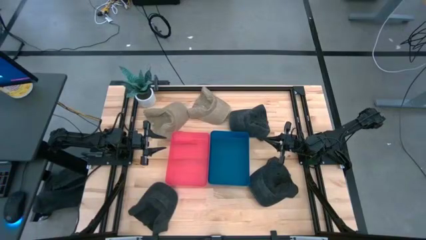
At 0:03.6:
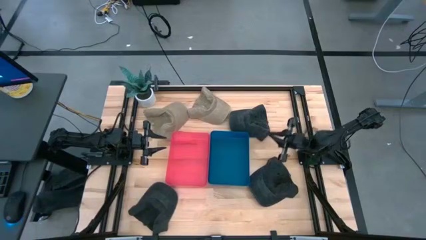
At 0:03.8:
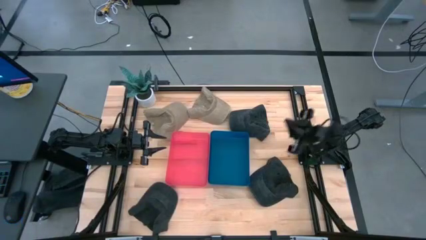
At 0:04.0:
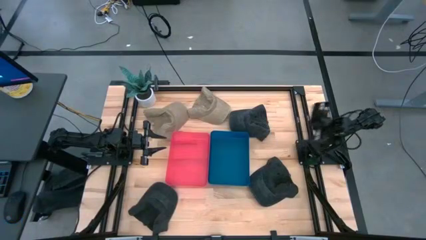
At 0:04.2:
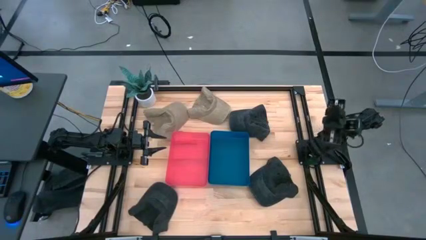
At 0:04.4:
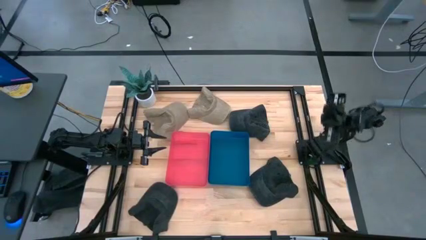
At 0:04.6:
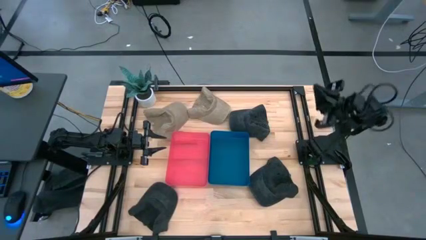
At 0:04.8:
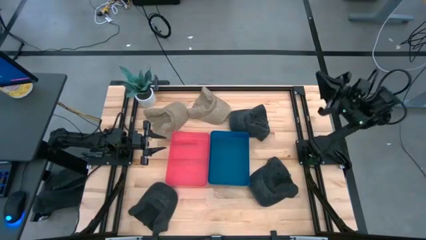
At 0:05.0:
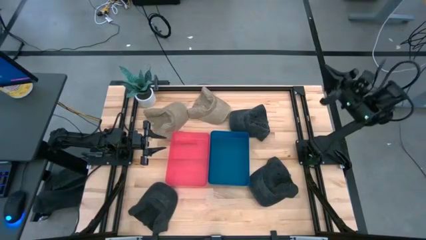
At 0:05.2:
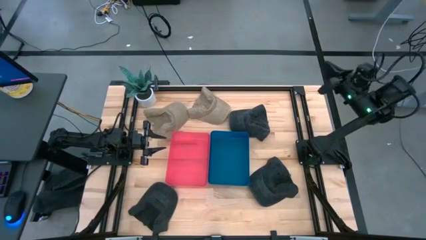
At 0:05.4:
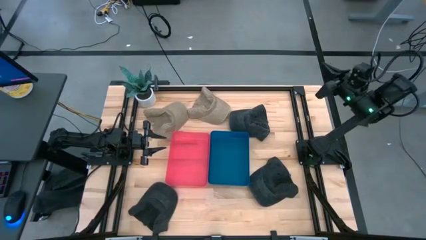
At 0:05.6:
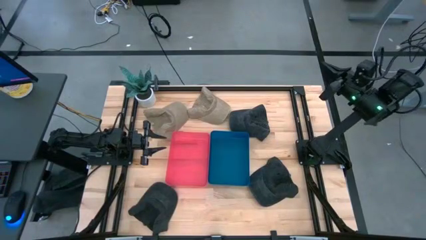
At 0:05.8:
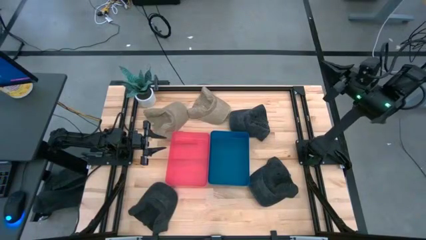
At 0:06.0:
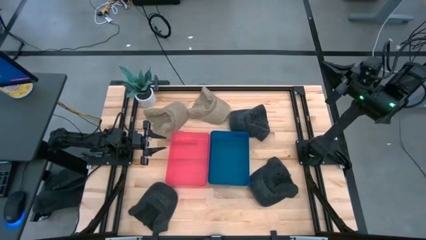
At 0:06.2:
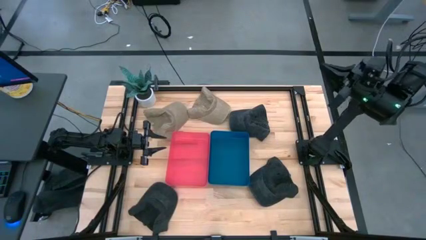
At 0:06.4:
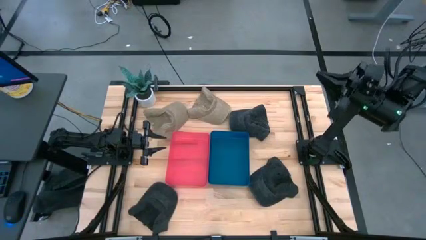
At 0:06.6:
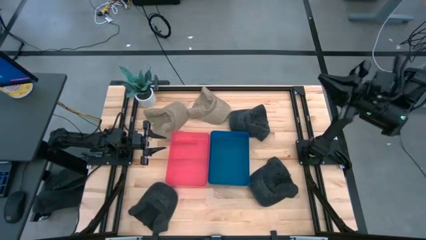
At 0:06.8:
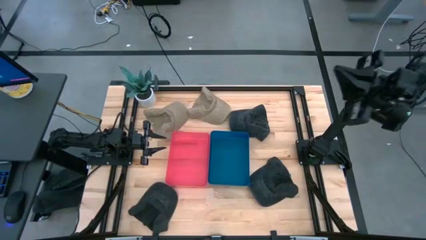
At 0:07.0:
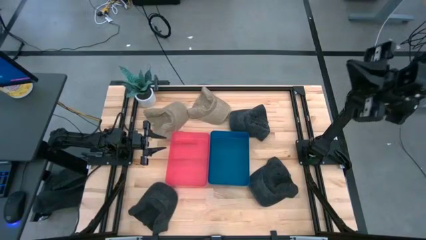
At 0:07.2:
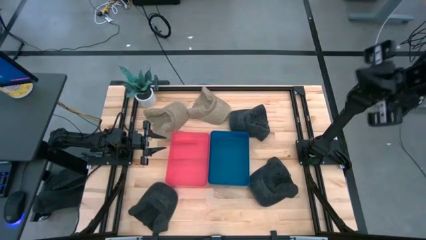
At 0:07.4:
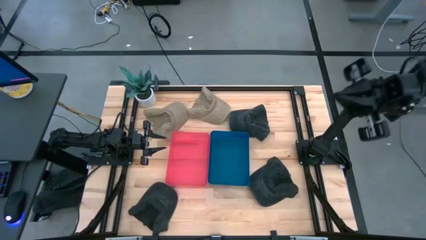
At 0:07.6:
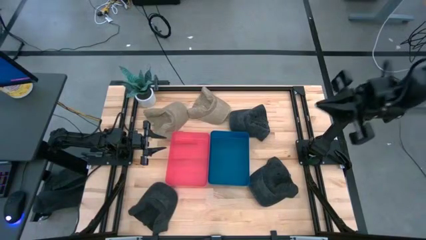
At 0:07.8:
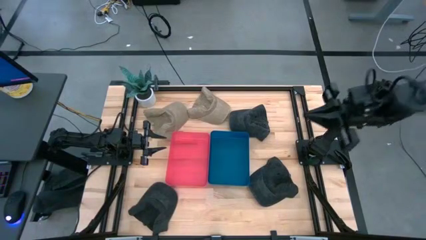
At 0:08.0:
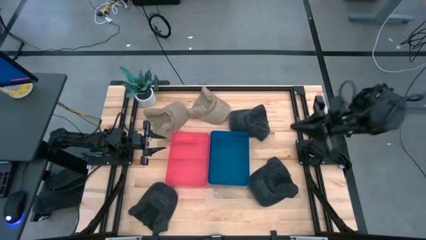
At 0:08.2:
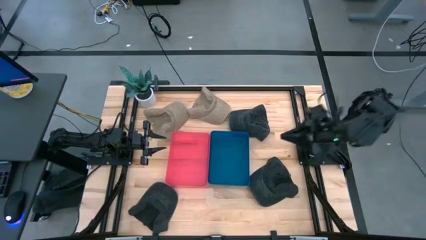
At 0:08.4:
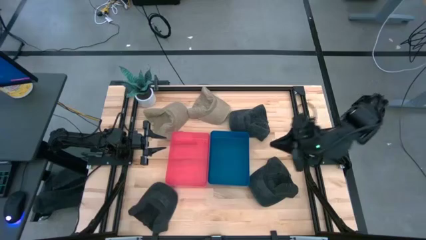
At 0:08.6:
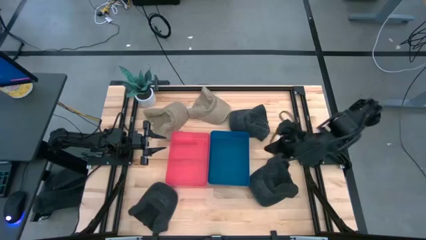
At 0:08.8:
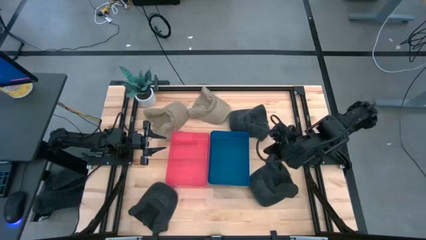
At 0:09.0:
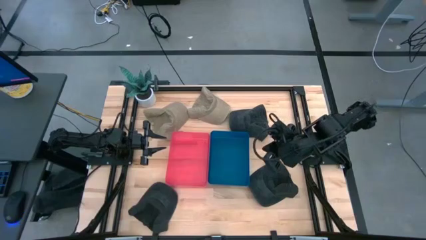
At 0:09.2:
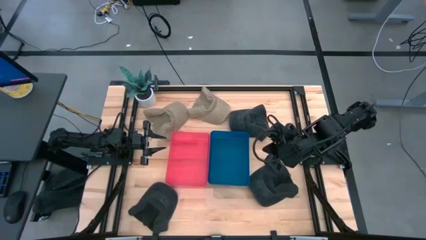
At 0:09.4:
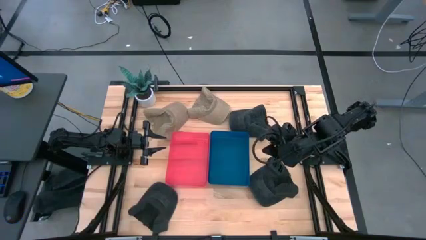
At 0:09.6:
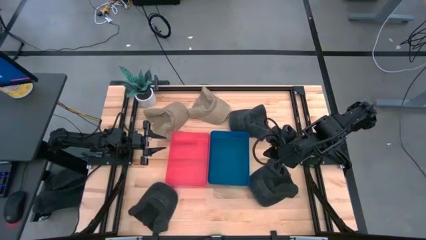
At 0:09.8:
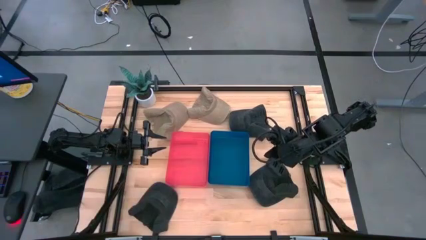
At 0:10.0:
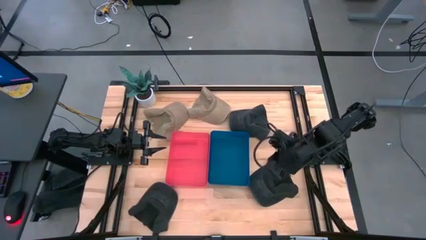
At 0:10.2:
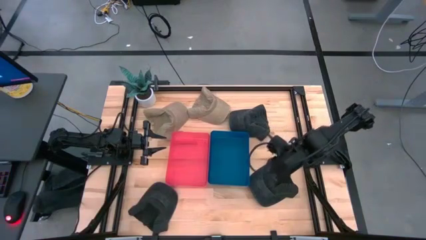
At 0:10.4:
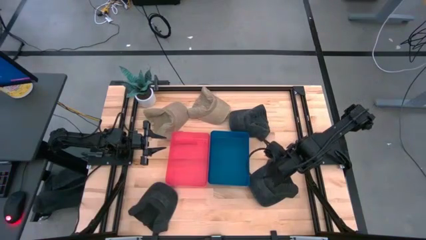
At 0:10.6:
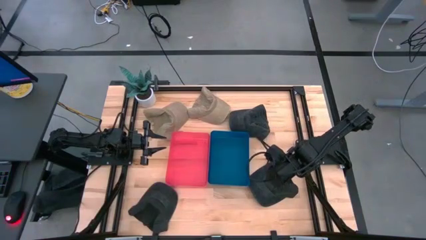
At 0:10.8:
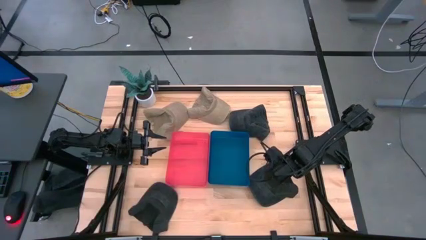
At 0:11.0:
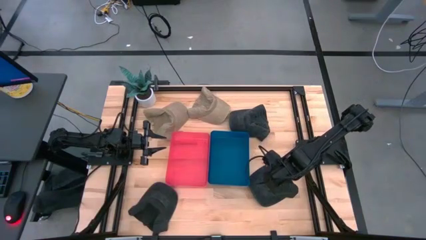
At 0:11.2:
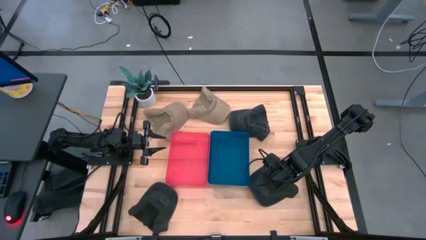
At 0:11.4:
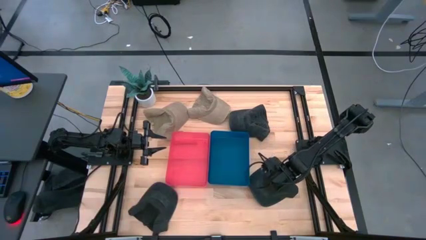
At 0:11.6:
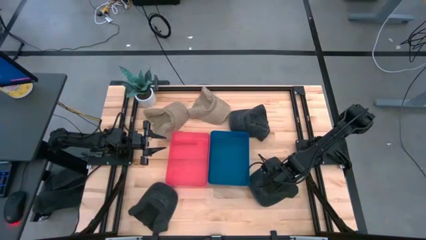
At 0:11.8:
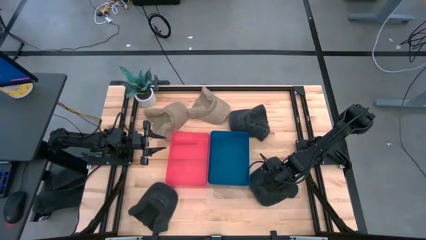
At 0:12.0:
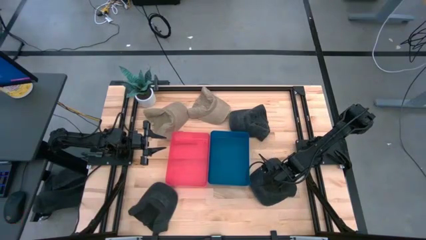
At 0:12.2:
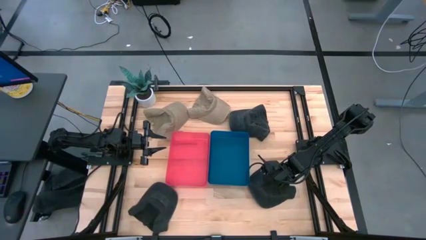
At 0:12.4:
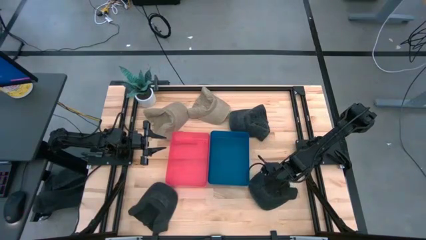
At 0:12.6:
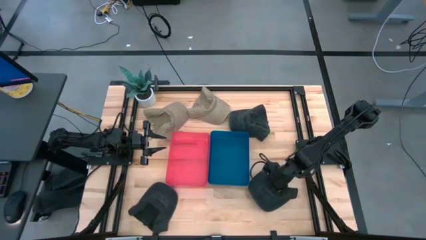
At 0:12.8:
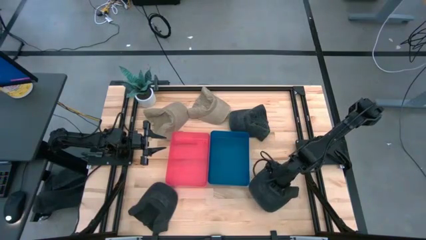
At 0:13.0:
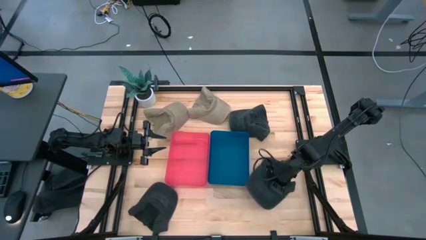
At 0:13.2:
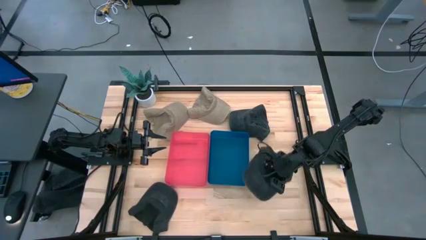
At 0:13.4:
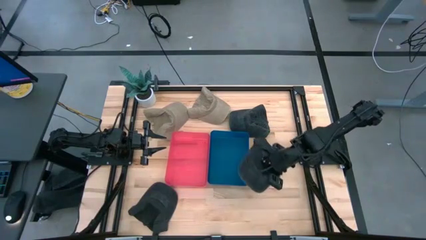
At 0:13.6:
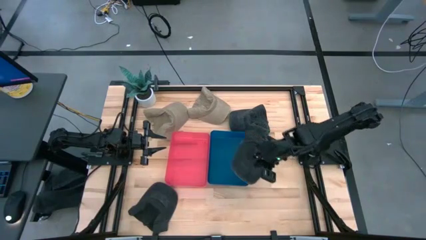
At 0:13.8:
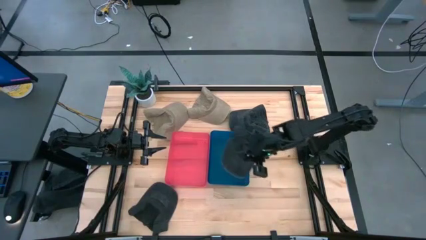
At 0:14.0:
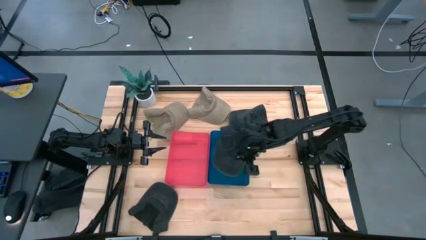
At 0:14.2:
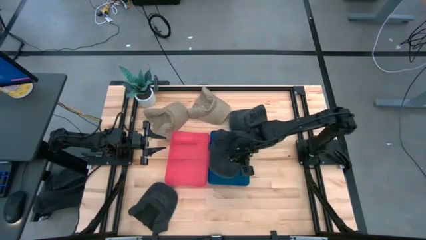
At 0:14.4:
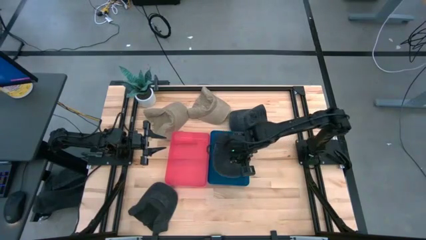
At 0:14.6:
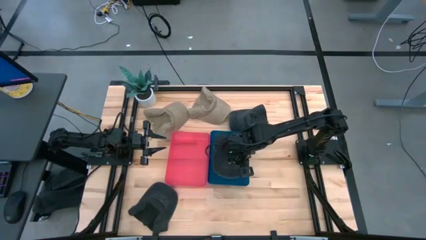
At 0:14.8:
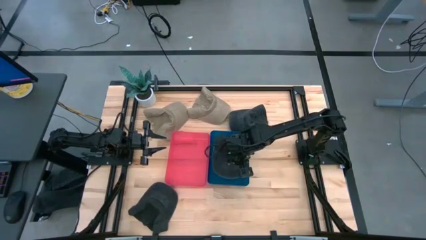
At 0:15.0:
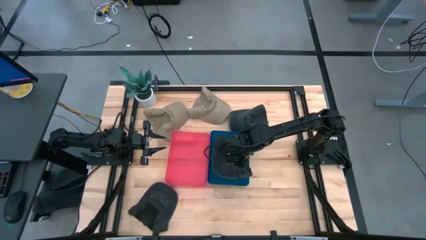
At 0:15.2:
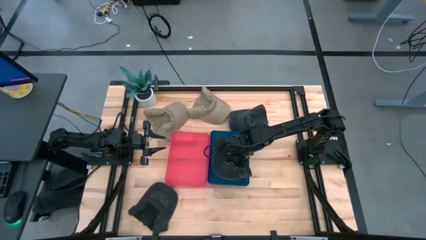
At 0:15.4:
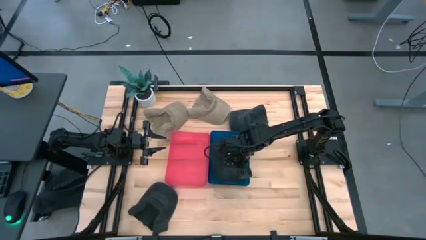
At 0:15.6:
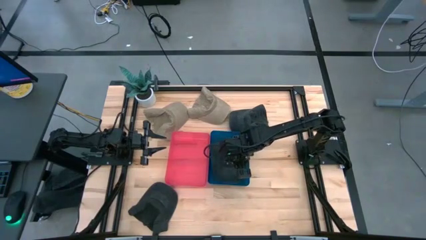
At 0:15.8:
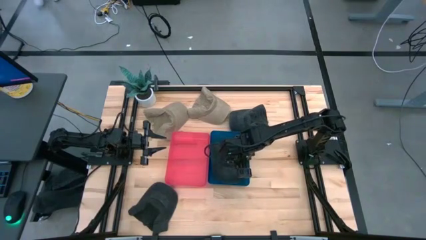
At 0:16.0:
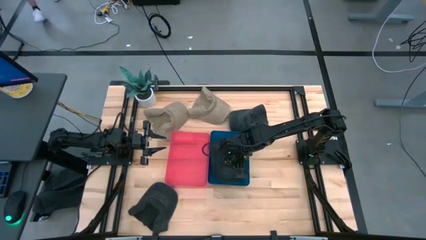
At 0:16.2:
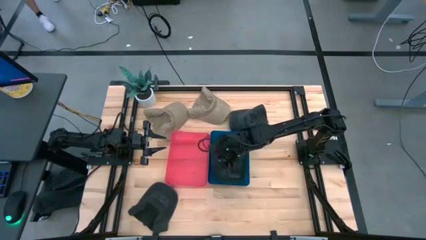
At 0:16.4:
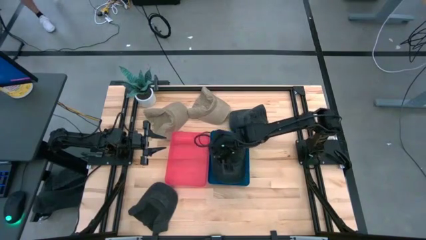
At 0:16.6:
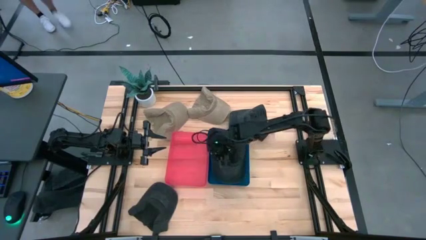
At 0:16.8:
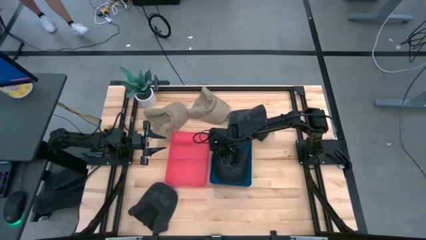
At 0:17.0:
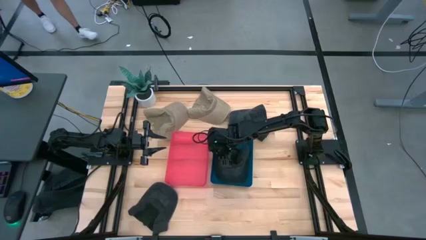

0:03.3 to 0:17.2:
Task: Pick & Place hat
Put the bottom right black cap into the blue bin
